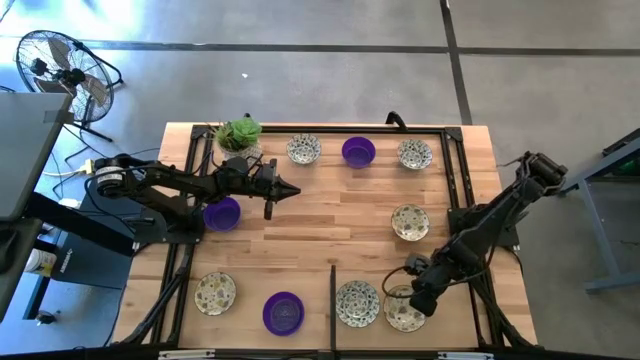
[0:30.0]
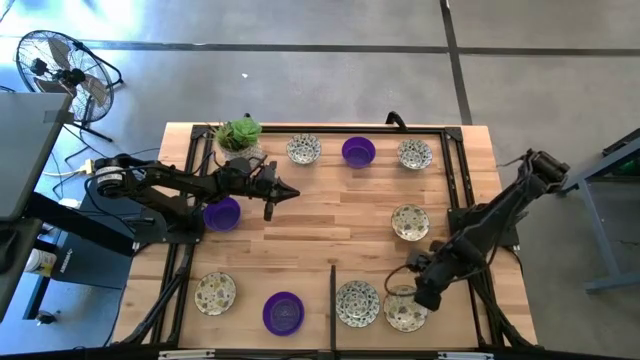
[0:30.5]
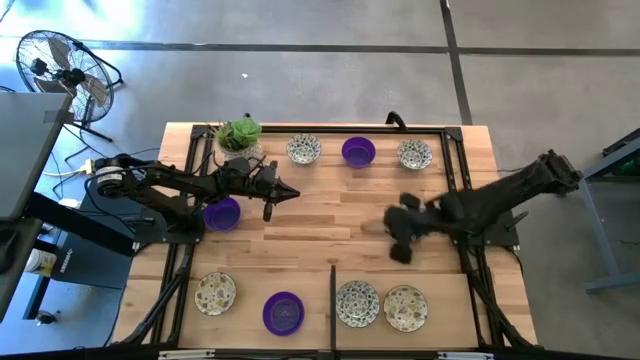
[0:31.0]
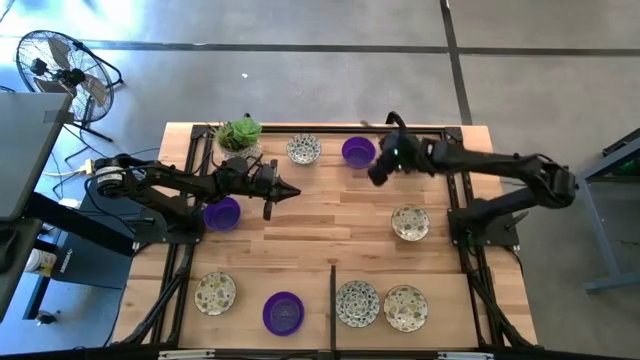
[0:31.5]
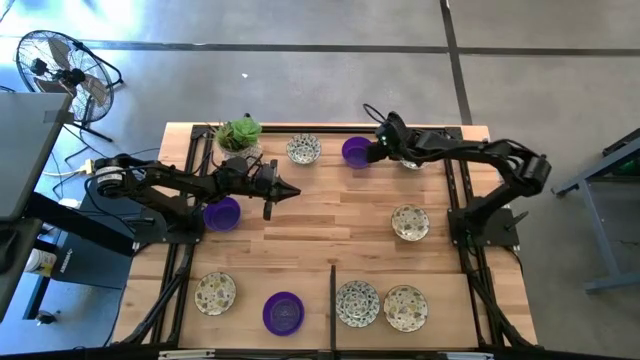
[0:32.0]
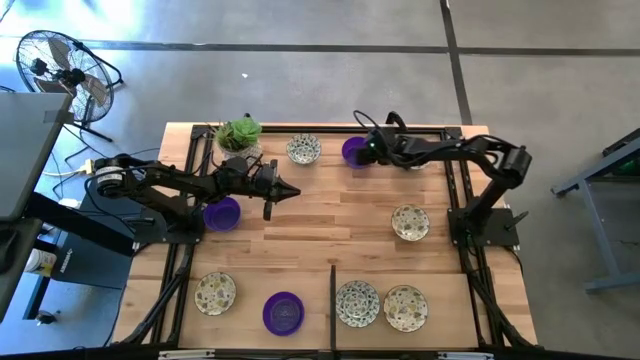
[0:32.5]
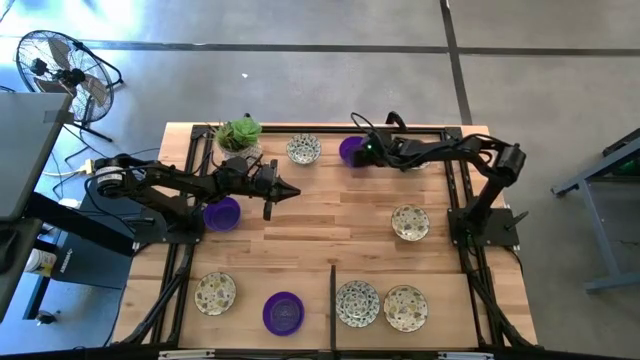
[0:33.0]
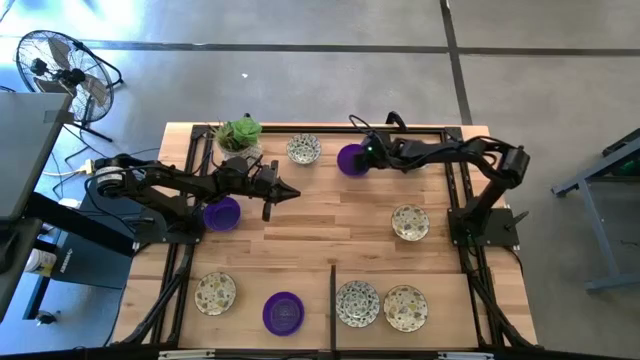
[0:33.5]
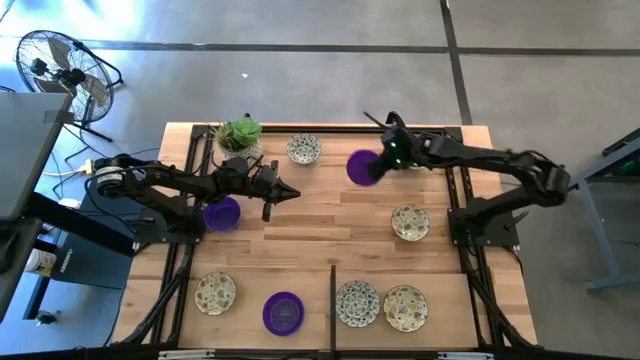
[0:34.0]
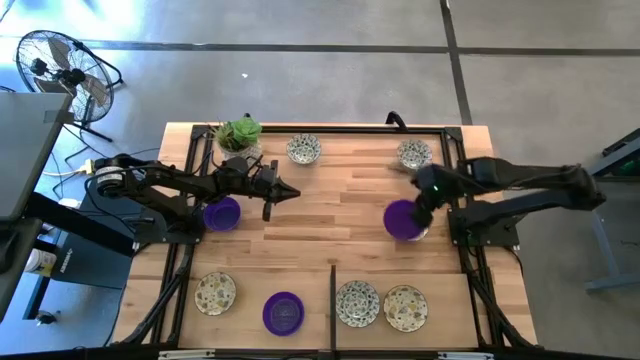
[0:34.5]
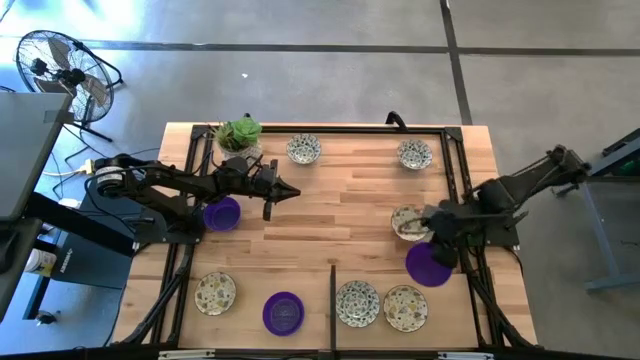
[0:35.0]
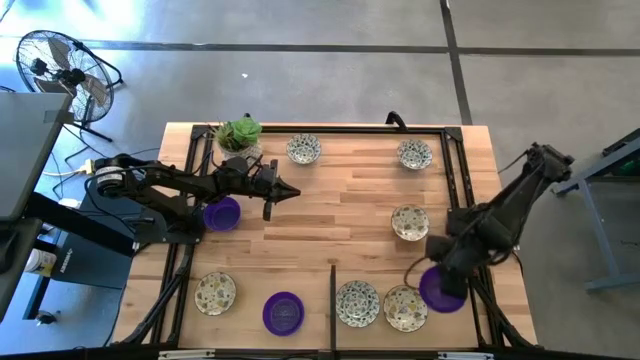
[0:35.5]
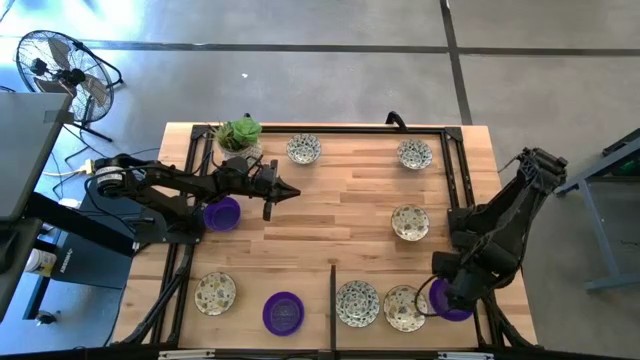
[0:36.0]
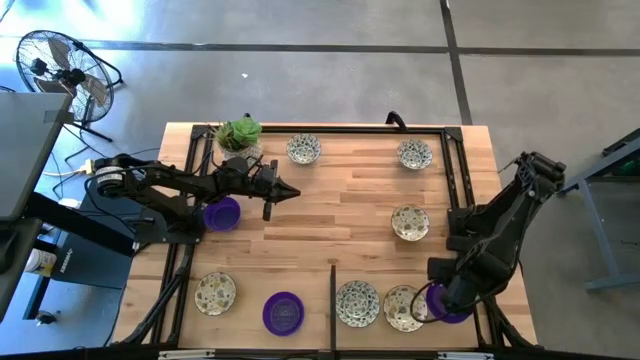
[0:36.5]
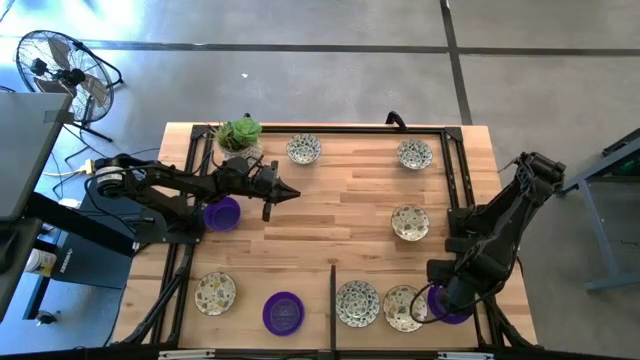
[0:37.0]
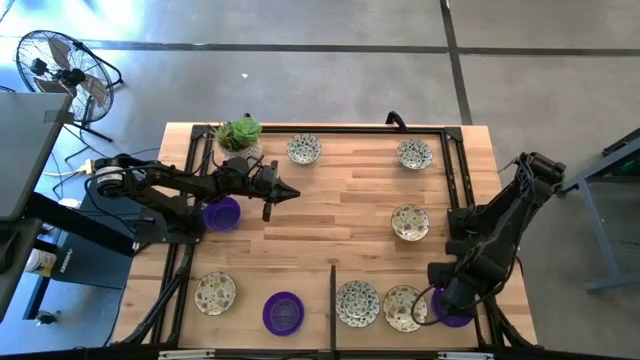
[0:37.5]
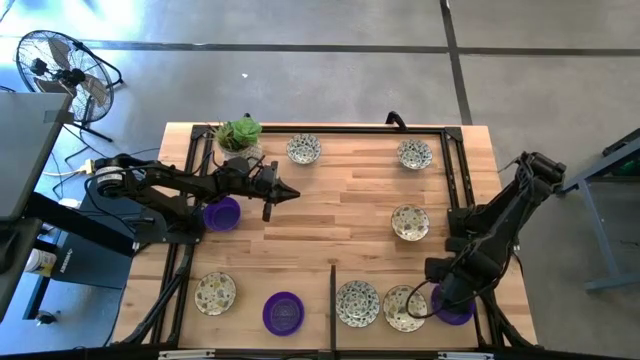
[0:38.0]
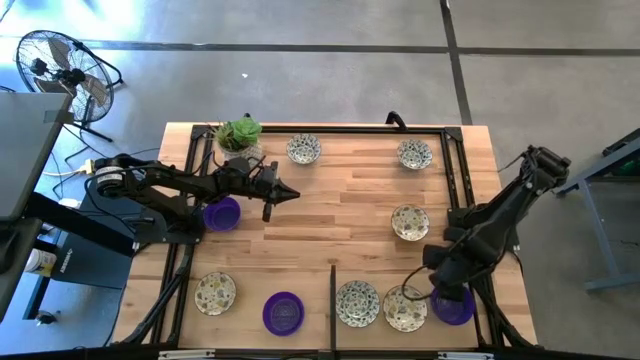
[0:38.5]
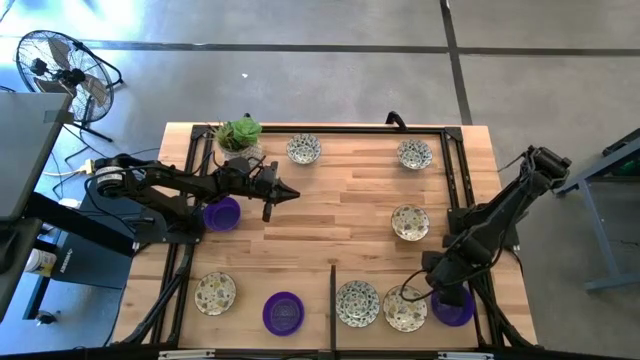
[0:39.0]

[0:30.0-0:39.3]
Task: Pick & Place Mini bowls
Put the top purple bowl on the shelf

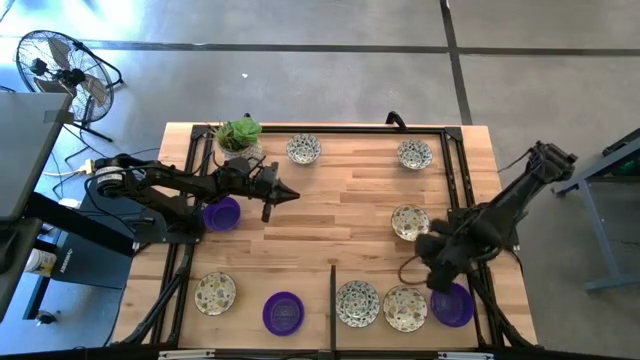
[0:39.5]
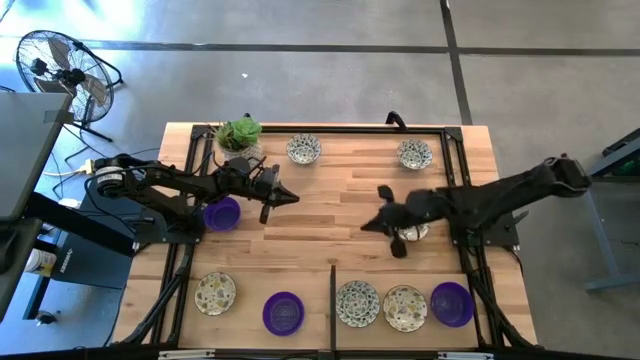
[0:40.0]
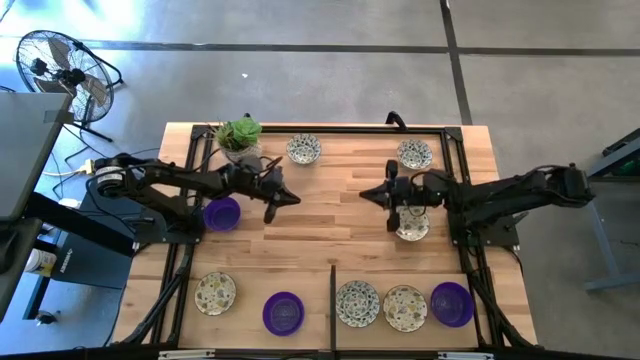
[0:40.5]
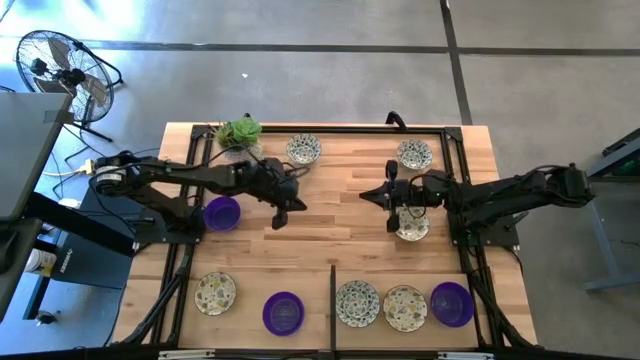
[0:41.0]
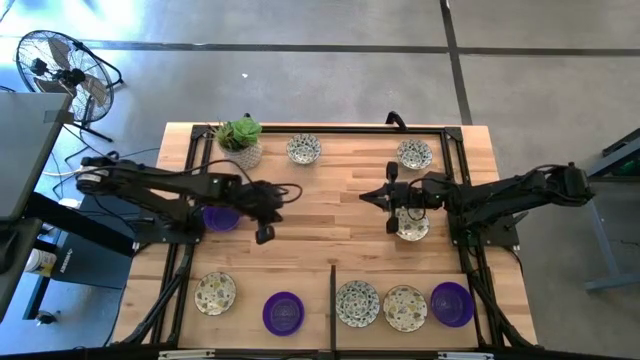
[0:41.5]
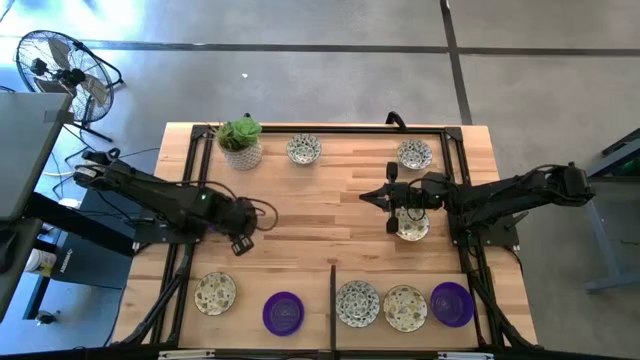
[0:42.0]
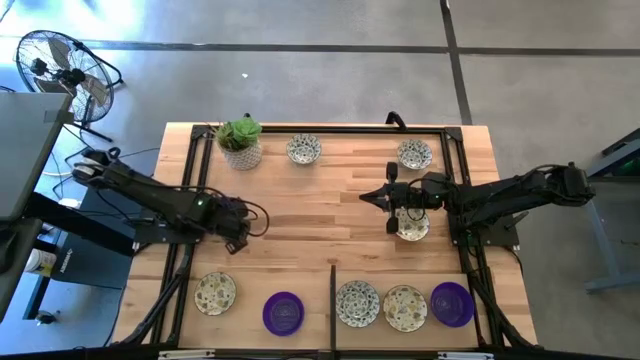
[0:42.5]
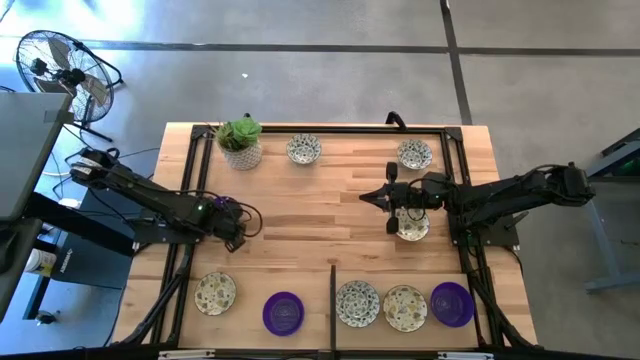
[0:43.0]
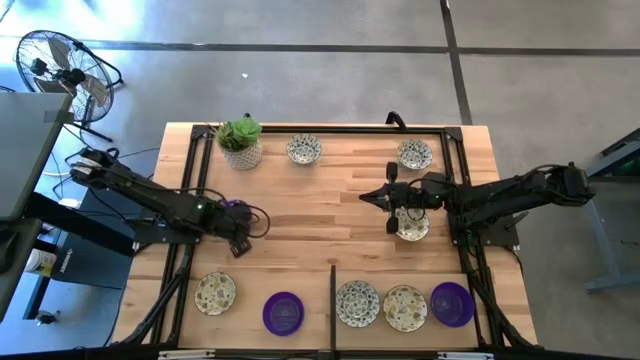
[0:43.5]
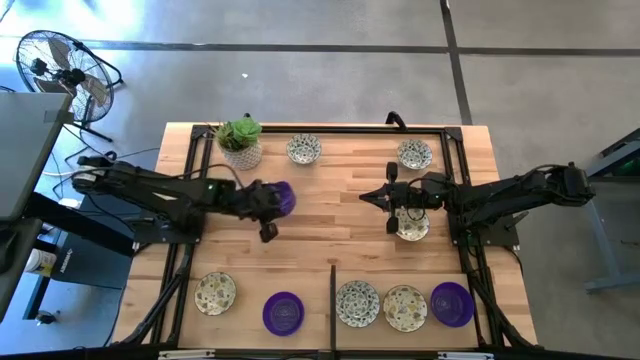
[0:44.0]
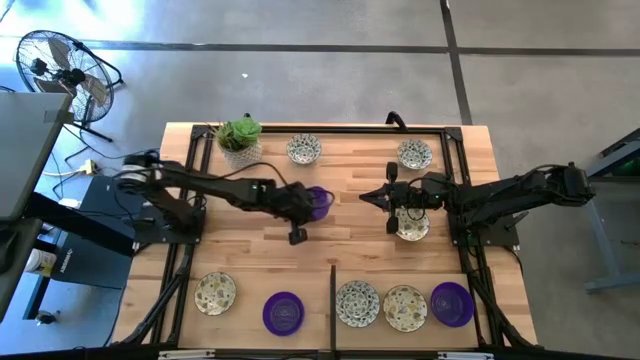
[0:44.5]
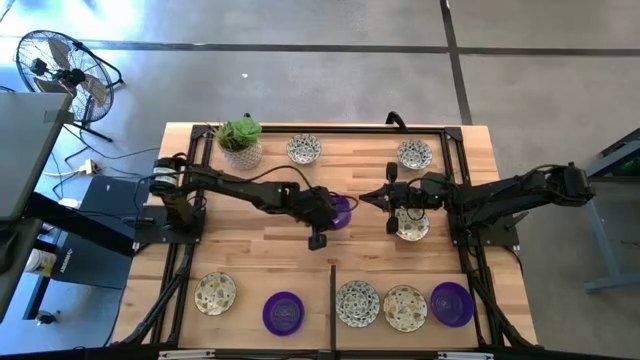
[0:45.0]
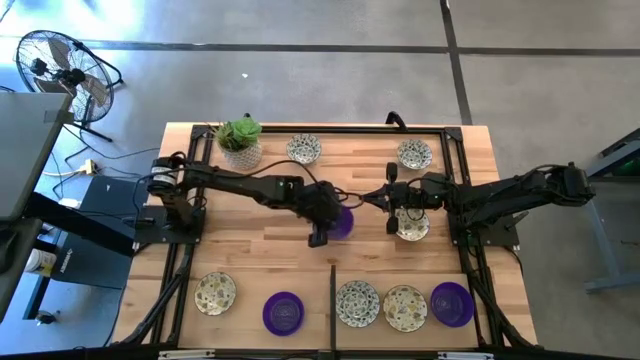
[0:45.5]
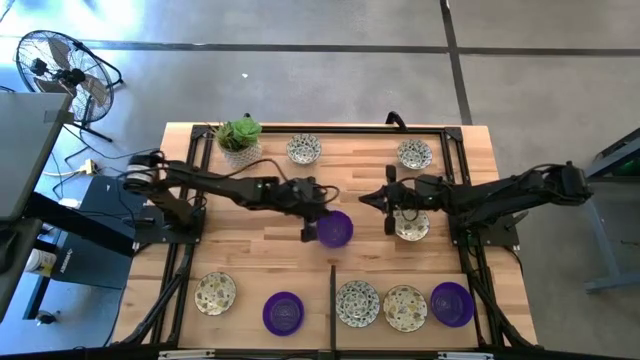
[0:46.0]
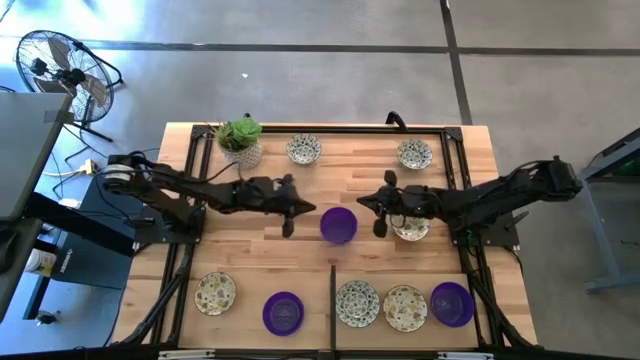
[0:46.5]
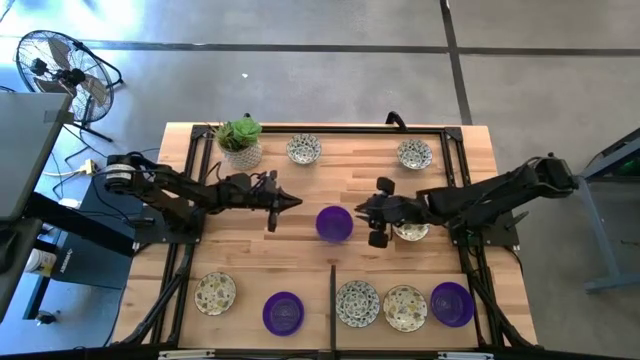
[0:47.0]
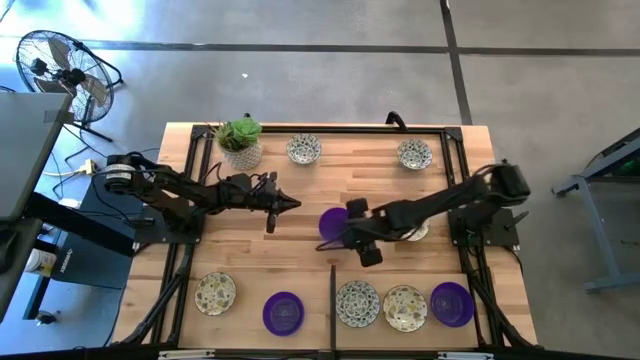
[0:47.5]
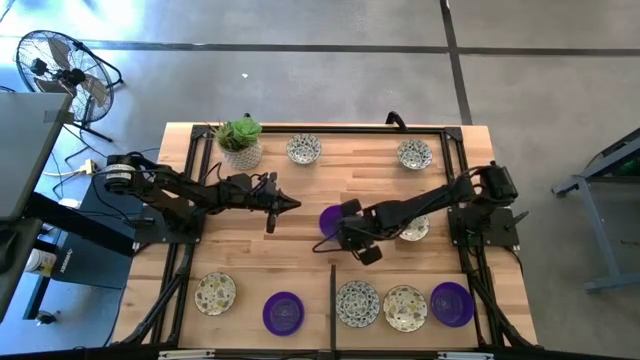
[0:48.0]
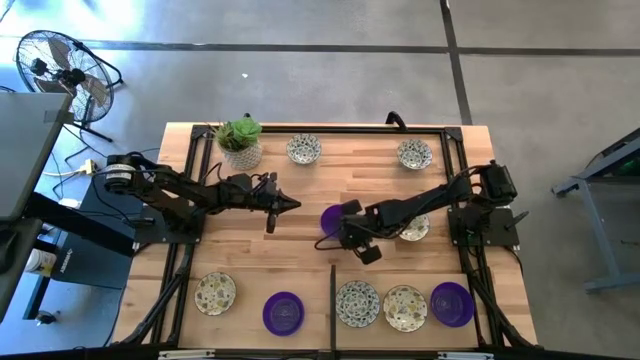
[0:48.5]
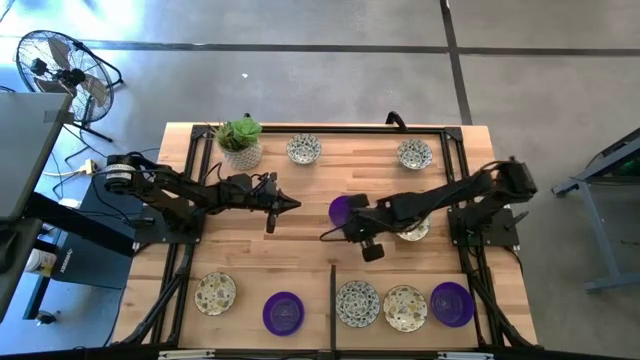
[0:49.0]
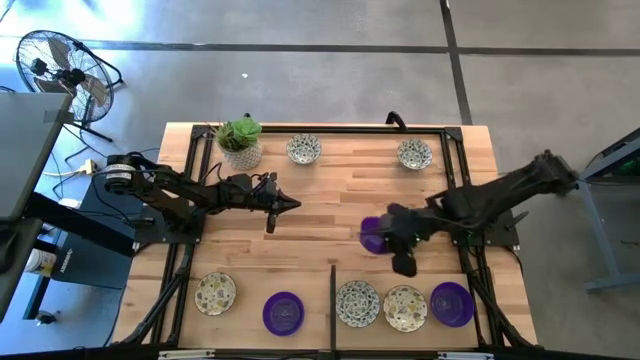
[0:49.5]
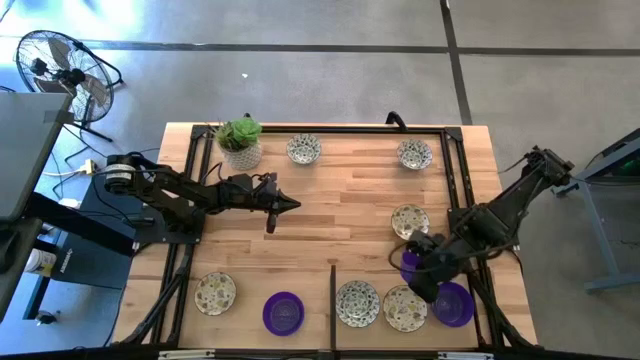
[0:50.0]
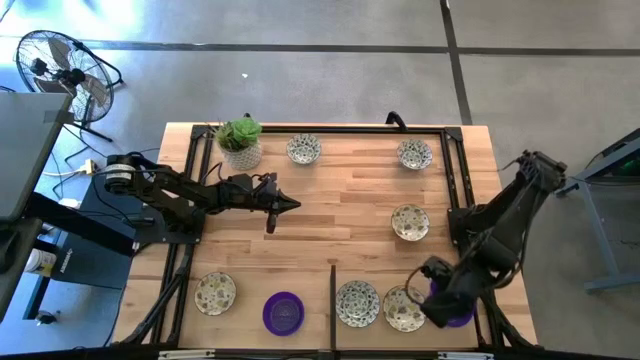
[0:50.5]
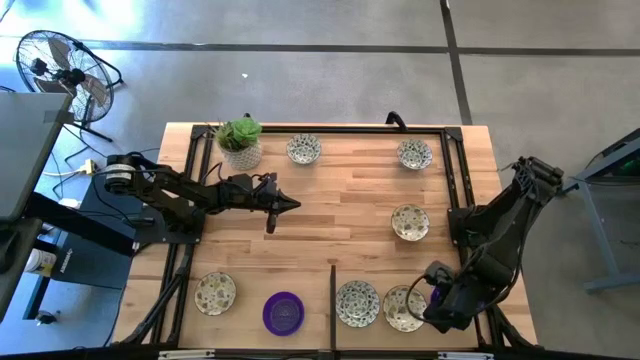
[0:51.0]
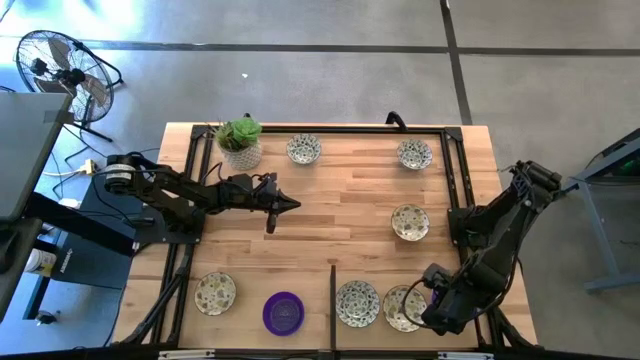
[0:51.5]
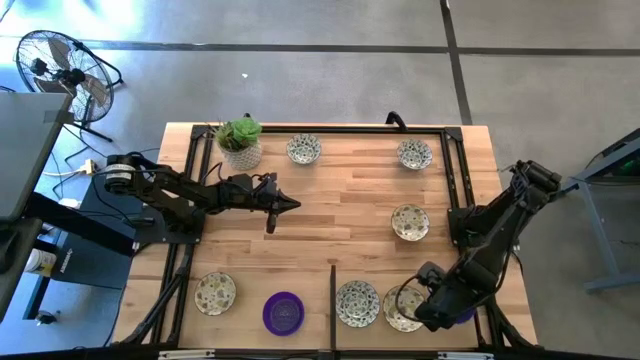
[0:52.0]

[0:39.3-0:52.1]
Stack the top purple bowl on the purple bowl on the shelf
